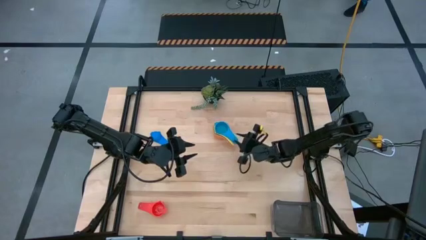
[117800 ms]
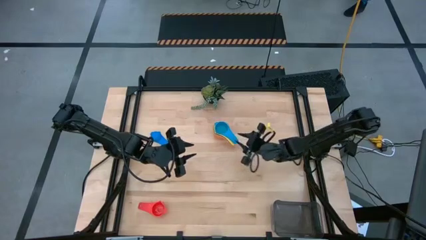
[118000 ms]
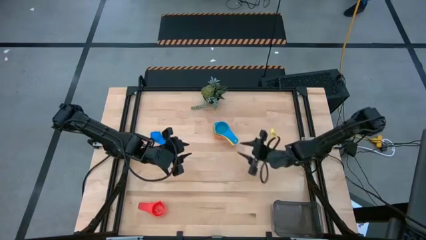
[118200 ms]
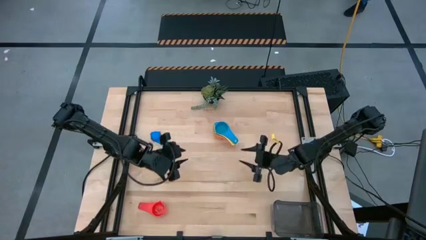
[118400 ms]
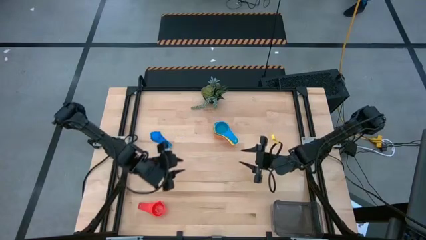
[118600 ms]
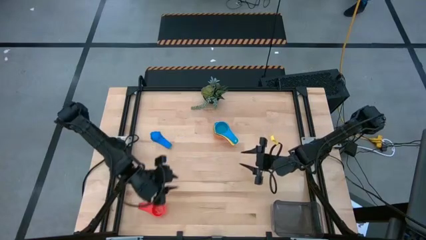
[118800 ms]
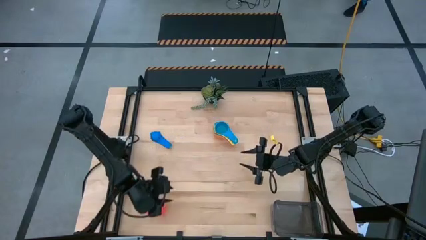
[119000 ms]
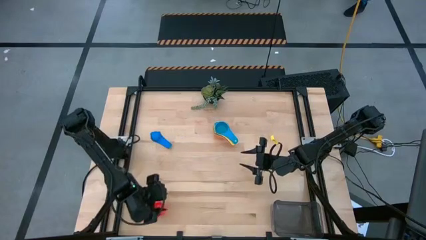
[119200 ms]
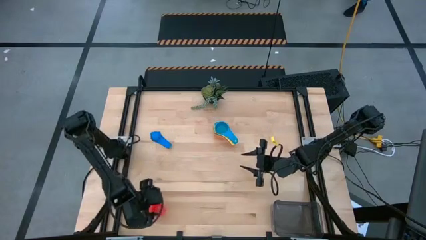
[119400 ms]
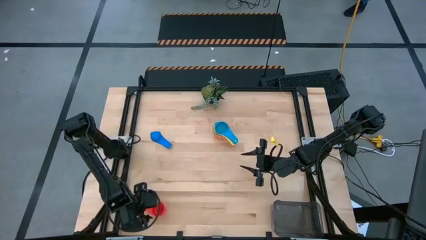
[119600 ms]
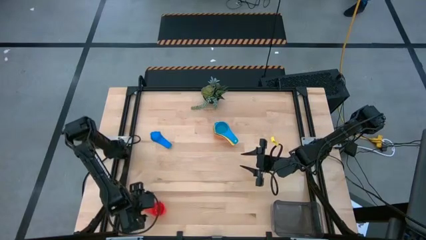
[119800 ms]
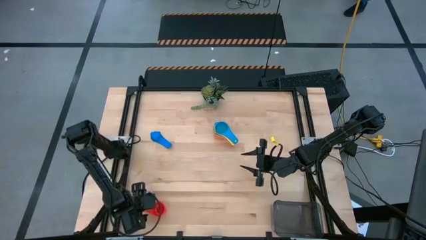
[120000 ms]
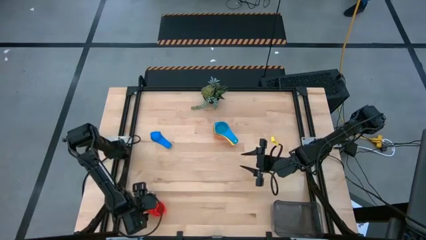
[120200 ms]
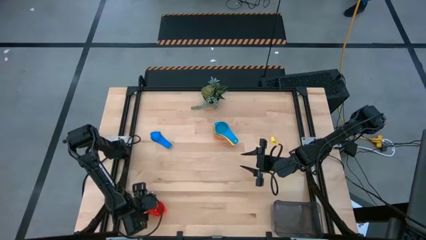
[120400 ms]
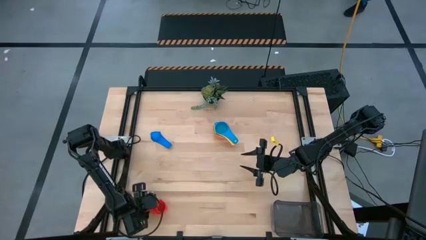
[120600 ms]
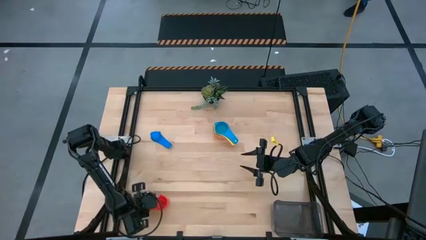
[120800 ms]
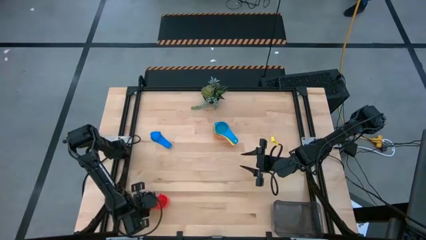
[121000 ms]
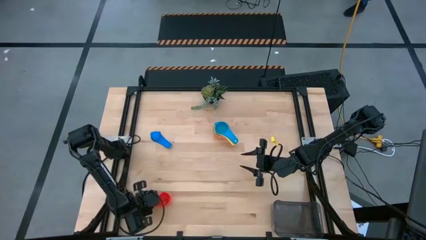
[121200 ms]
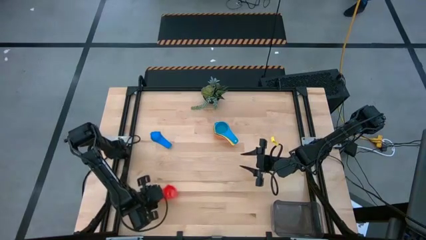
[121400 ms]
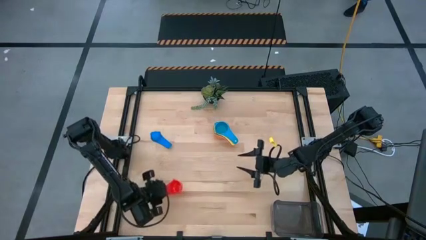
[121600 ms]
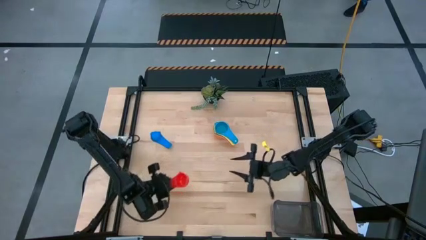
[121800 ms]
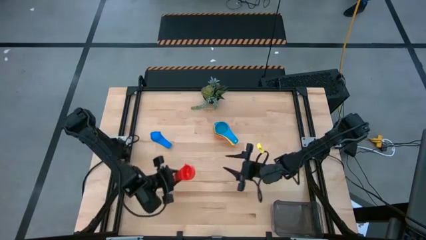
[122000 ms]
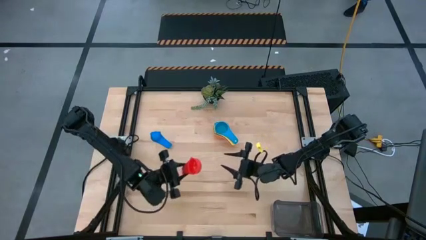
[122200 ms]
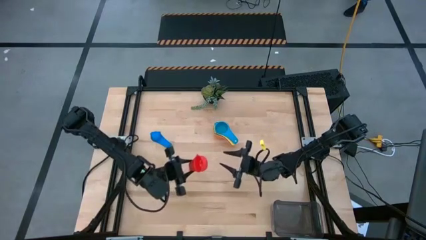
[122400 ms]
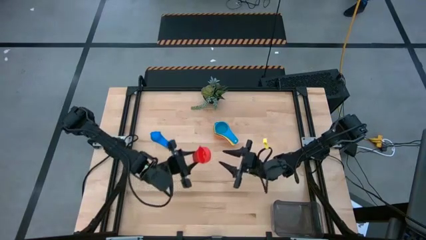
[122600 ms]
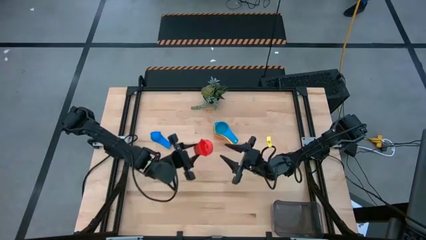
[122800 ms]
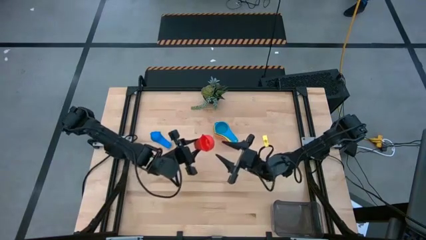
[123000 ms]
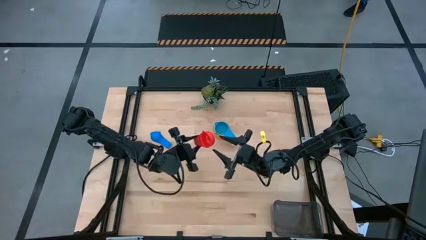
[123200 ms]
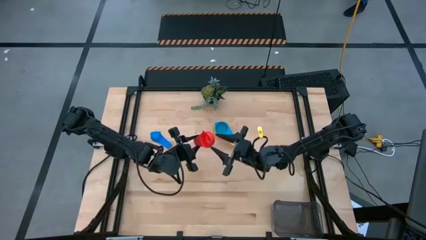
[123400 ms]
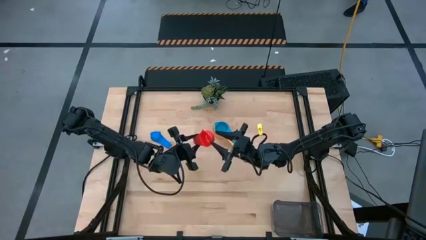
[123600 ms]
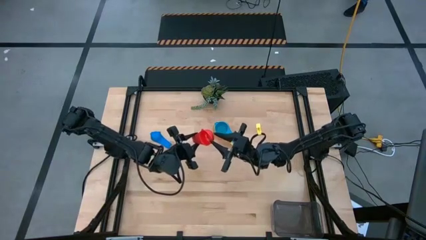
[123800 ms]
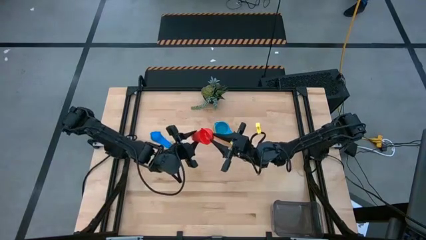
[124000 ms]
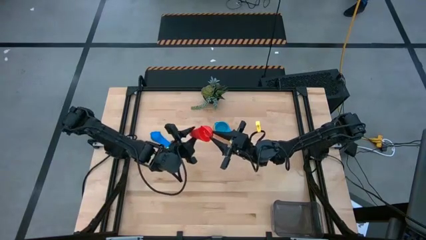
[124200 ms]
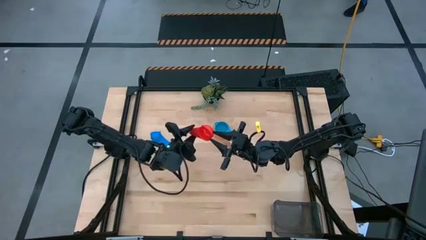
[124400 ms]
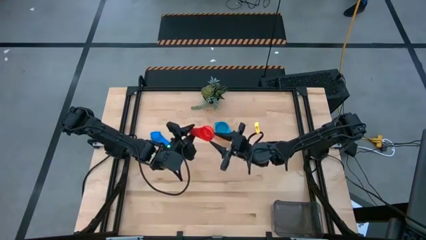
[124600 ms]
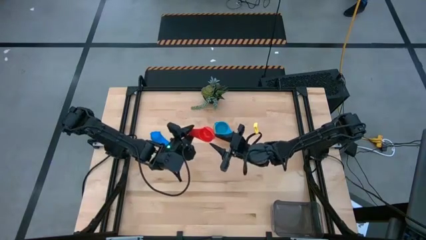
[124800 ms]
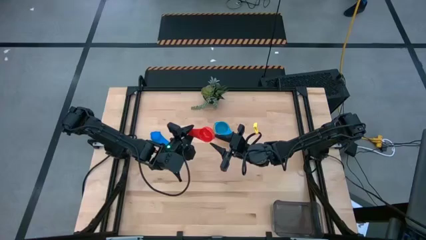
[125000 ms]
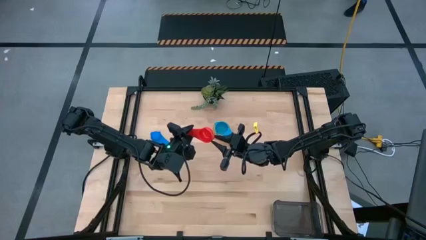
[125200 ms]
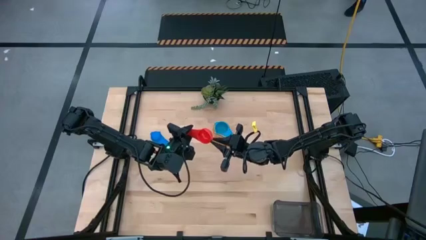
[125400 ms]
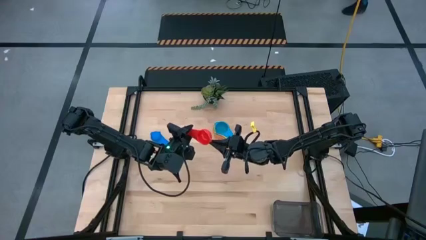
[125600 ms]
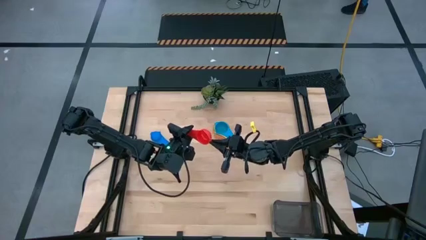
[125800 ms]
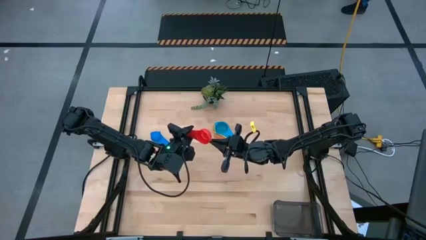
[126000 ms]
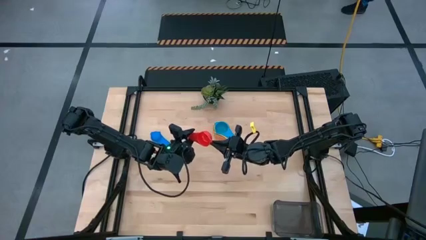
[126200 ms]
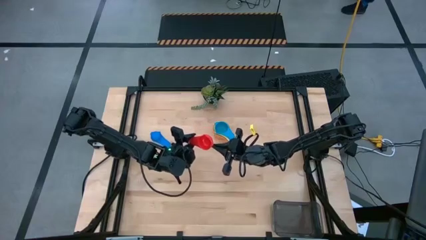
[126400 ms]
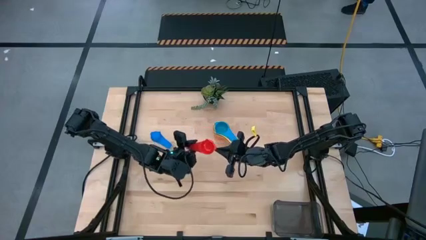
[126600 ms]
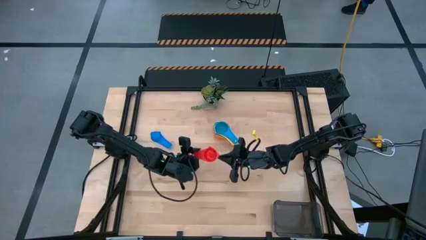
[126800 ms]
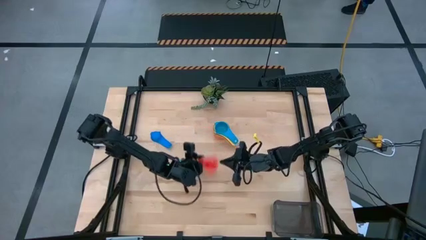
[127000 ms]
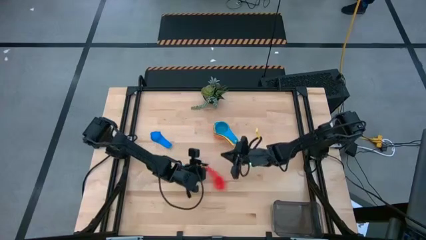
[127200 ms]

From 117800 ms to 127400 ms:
Task: Nest measuring cups in basket
Stack the red measuring cup on top of the blue measuring cup

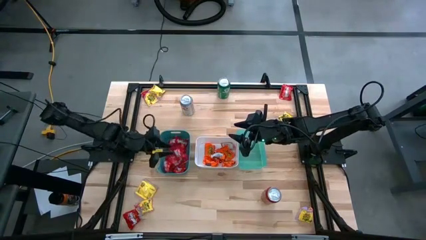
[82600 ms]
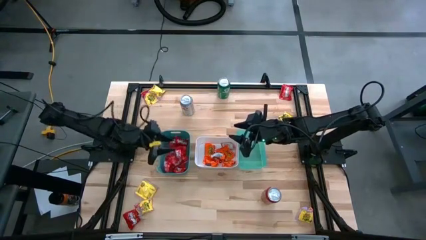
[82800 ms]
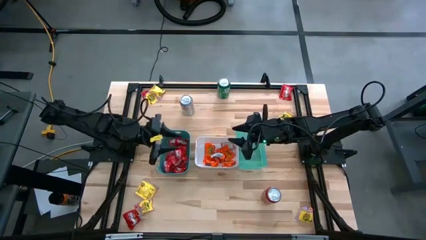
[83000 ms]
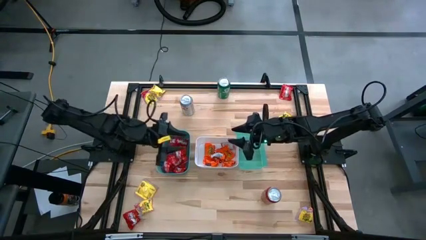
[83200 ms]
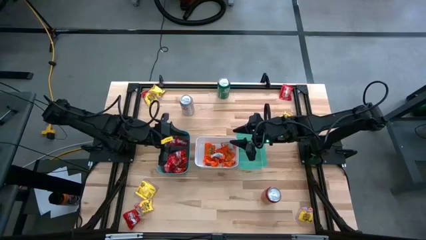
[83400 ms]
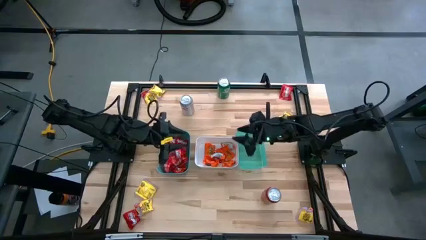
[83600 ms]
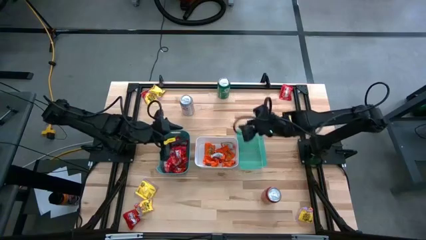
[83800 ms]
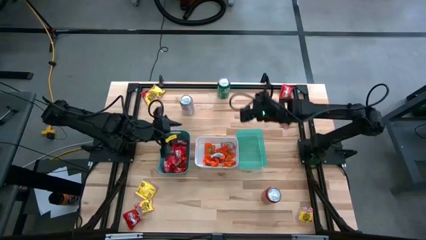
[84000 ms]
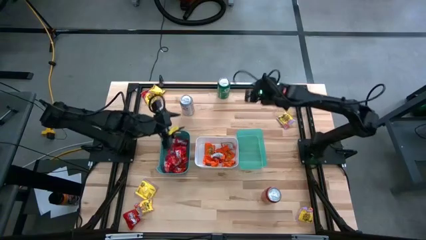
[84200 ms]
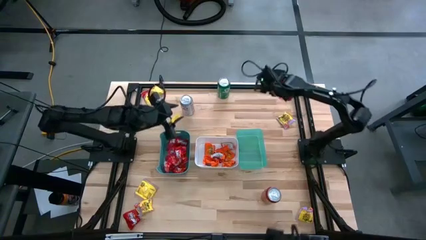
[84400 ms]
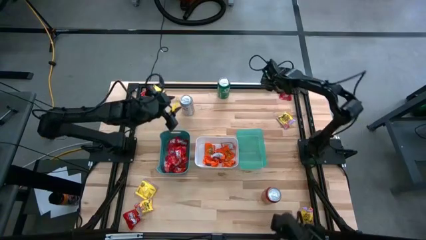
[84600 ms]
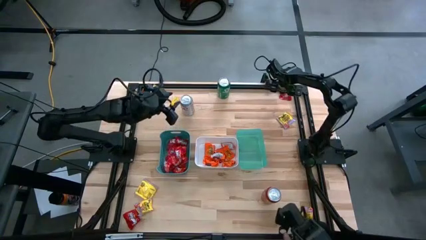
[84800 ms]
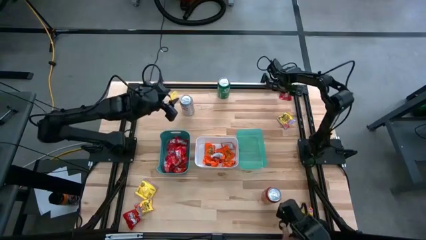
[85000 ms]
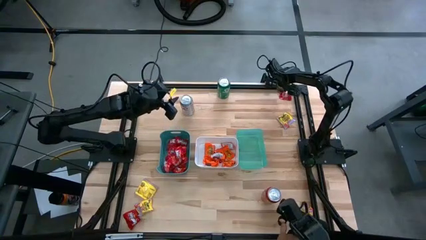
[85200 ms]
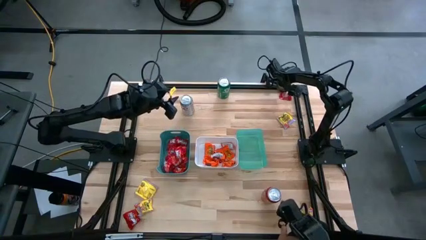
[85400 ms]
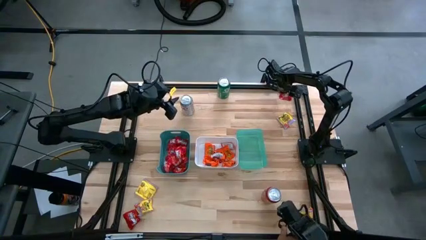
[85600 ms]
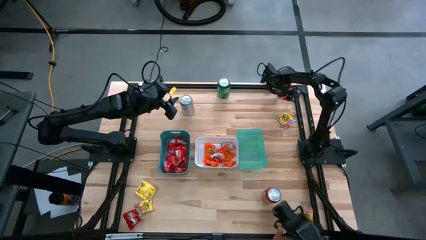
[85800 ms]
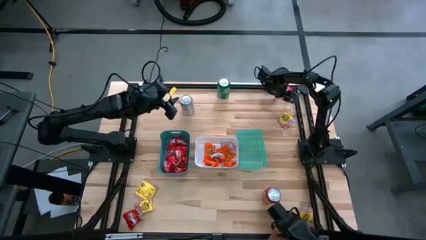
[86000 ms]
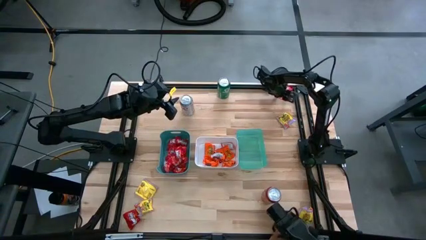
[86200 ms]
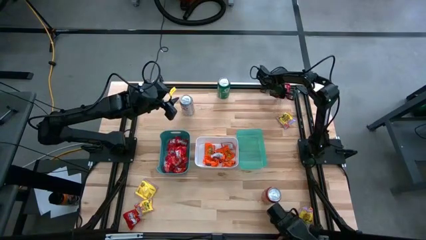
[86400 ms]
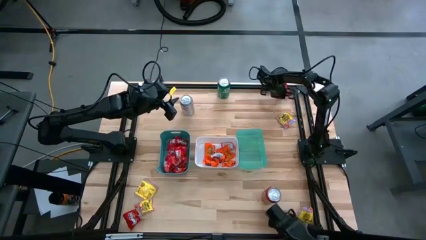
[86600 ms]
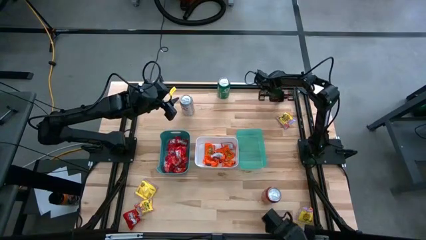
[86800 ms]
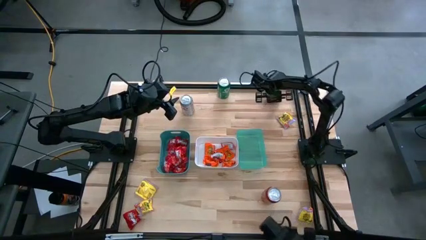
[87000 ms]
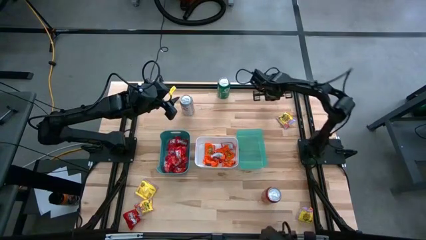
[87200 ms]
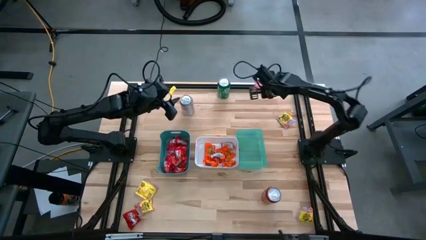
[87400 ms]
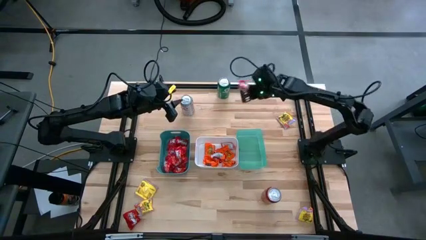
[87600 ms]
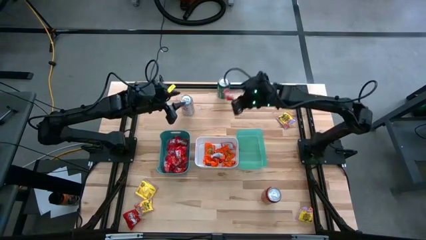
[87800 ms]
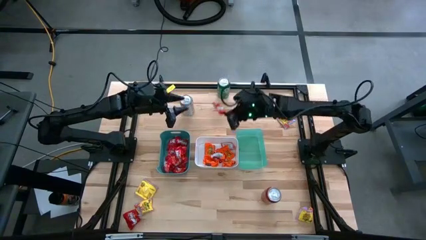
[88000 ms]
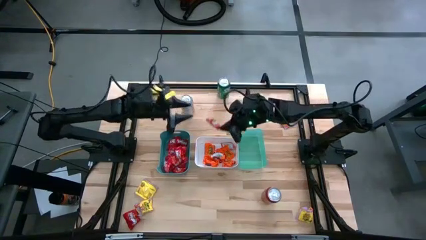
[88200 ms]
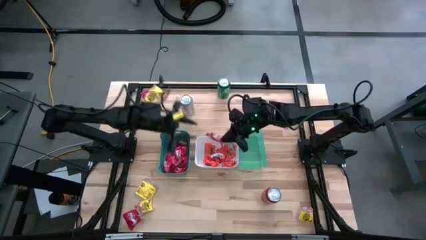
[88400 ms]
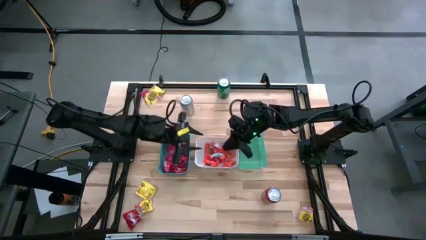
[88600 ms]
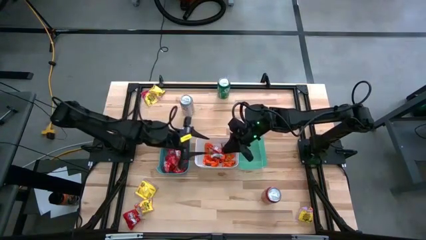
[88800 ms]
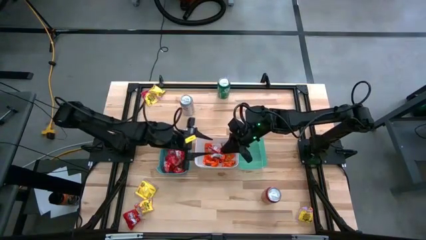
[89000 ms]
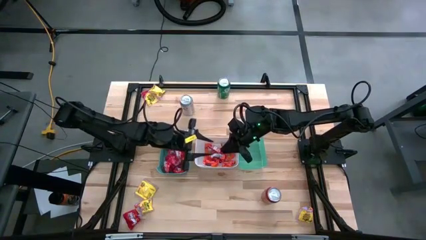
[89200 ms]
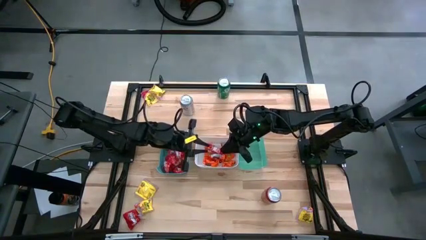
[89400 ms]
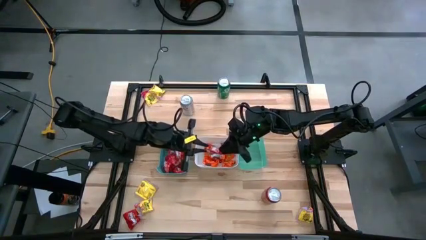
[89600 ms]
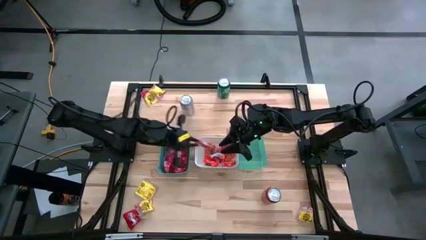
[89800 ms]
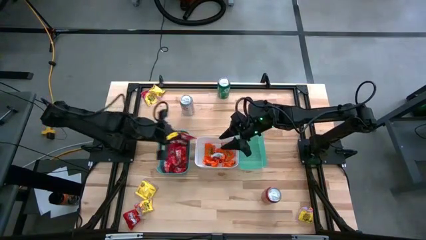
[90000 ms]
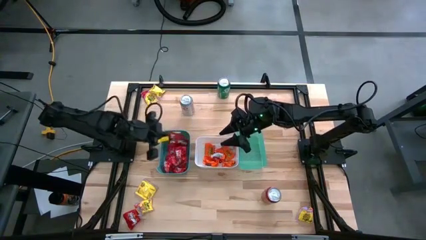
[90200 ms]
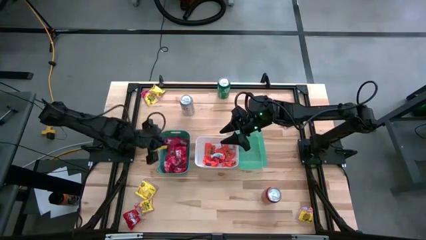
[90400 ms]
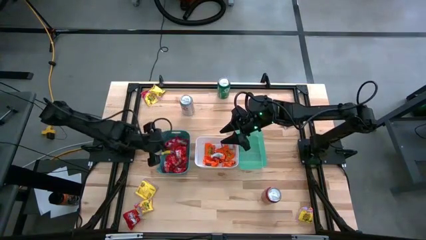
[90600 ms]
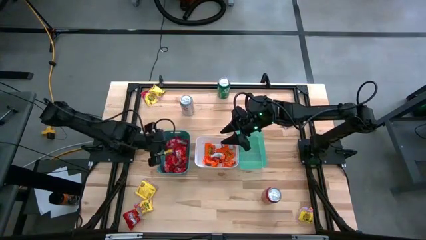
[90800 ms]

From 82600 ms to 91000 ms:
Task: Sort candy
Put the red candy into the green bin
